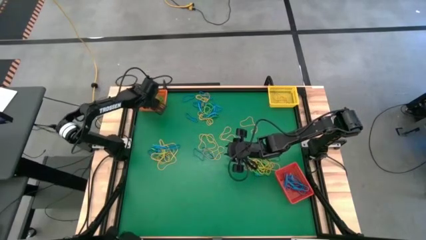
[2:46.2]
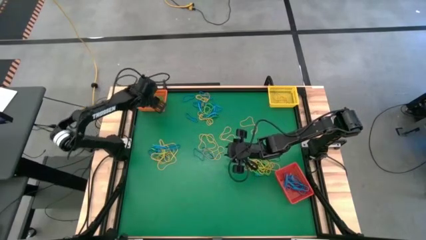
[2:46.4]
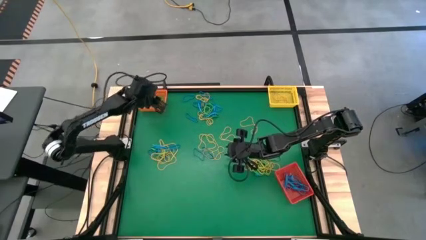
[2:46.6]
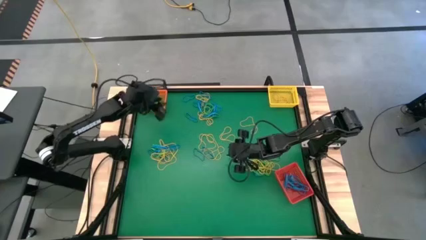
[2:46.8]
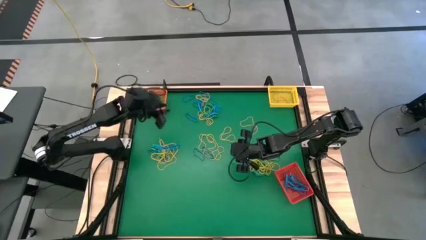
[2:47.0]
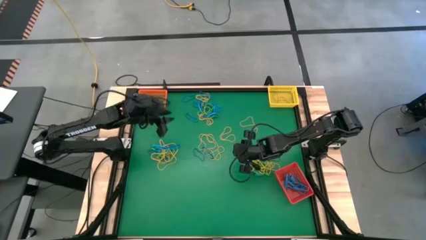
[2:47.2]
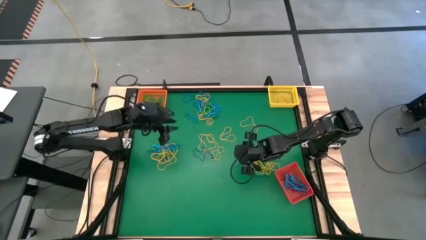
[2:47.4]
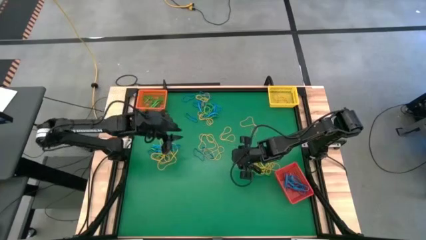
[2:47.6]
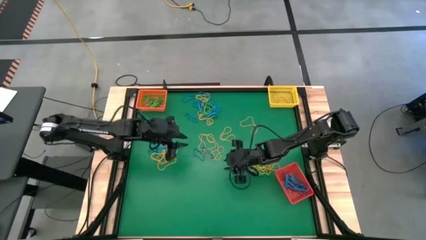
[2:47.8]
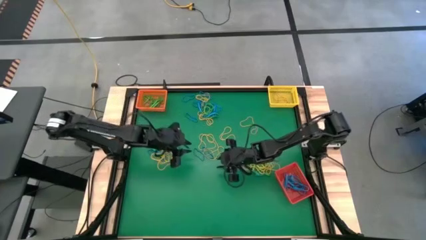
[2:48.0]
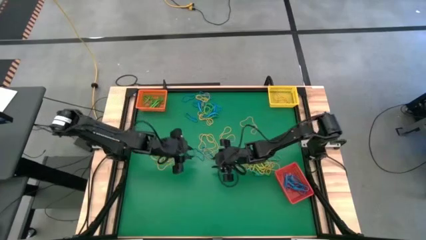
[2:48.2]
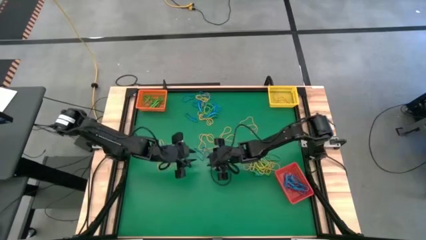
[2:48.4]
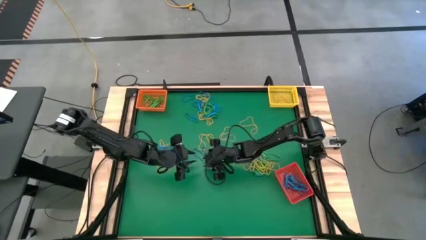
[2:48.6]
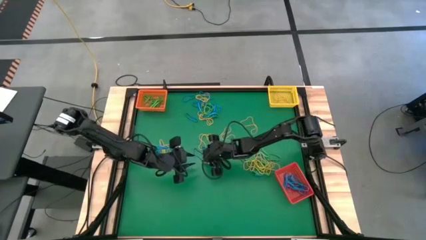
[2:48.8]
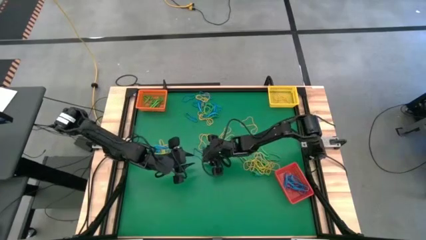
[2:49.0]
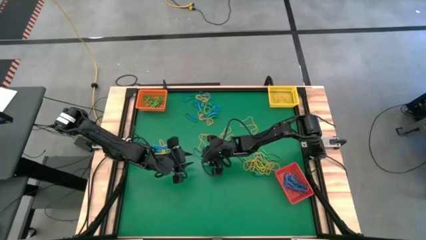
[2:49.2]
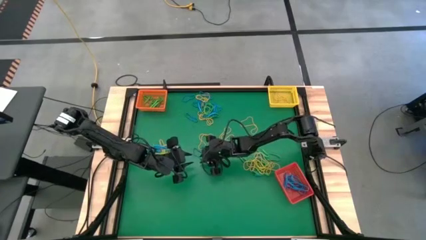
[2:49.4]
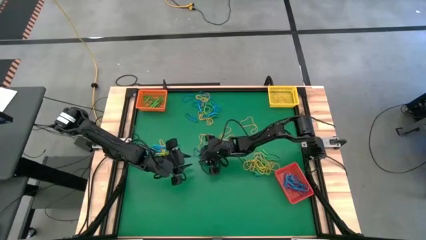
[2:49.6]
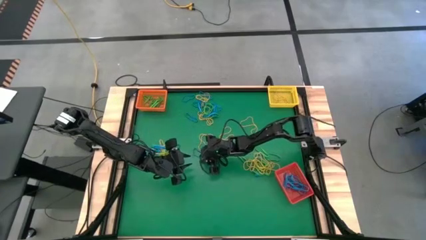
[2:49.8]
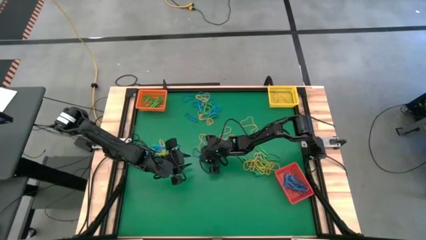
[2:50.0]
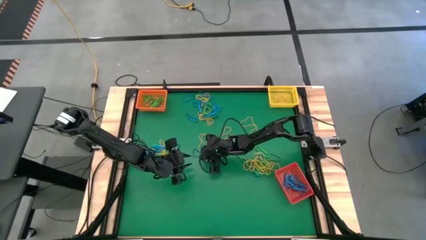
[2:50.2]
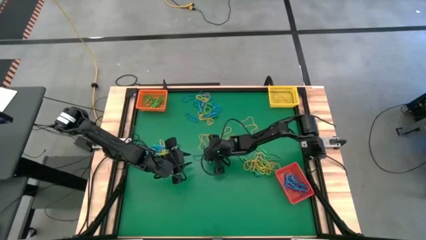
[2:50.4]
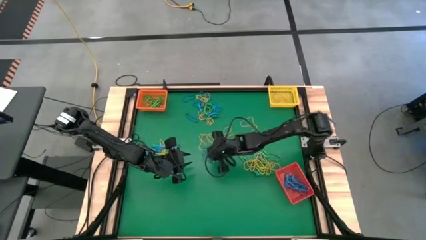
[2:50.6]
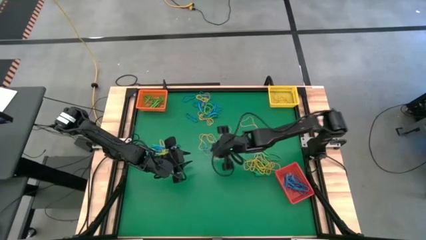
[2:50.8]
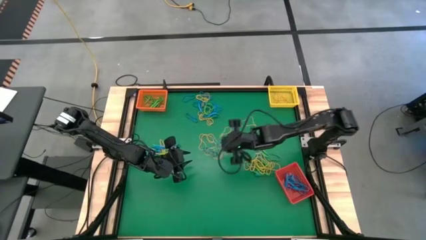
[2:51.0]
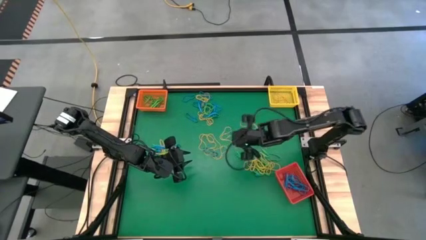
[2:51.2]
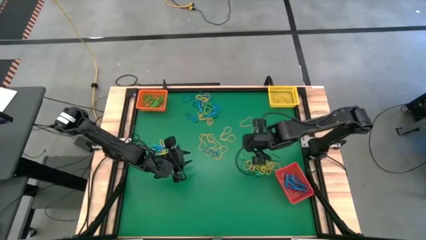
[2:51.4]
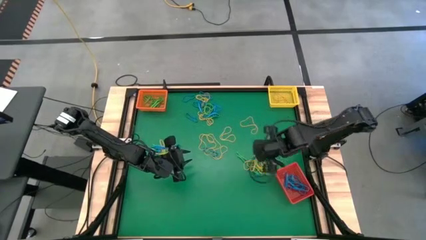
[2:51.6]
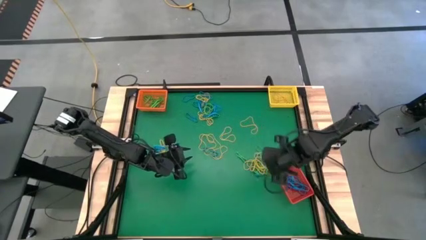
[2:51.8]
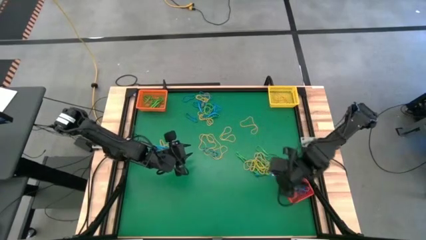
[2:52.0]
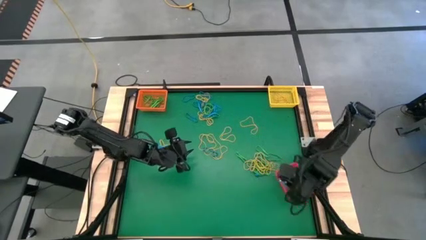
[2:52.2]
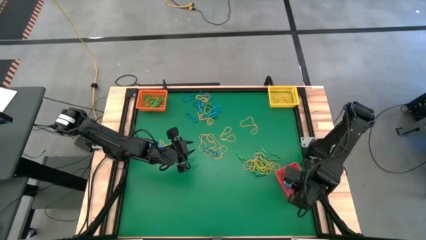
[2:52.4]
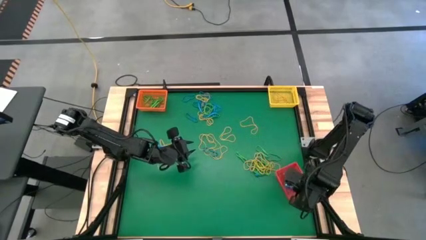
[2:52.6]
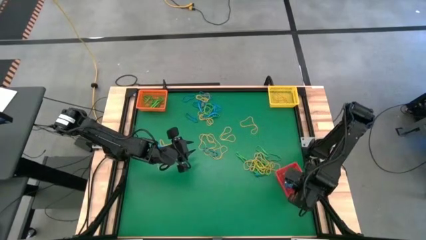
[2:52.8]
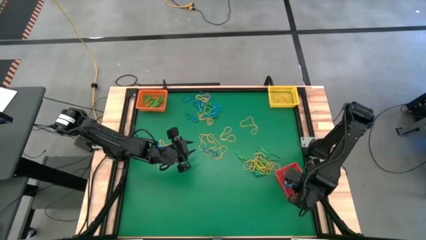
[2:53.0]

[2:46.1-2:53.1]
Task: Sort rubber bands into baskets
Put the blue rubber band into the red bin

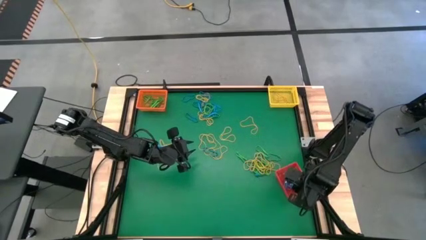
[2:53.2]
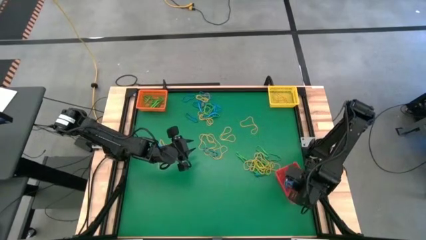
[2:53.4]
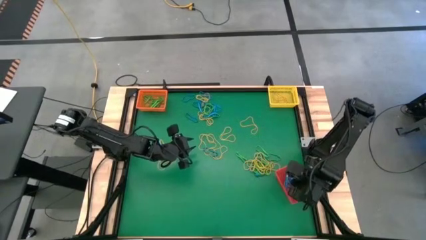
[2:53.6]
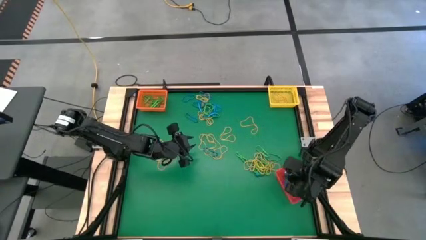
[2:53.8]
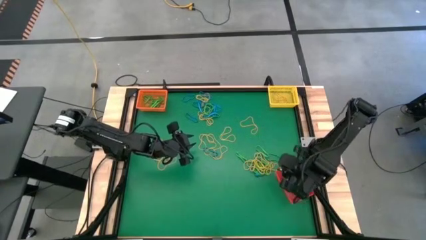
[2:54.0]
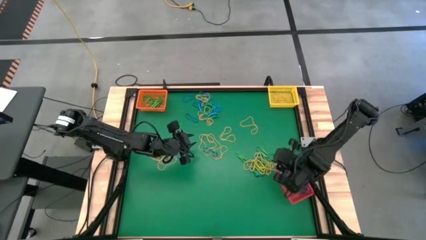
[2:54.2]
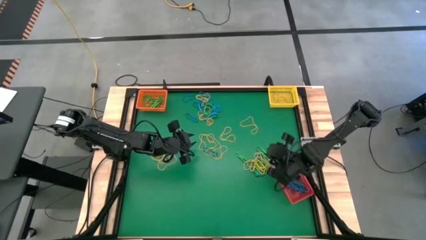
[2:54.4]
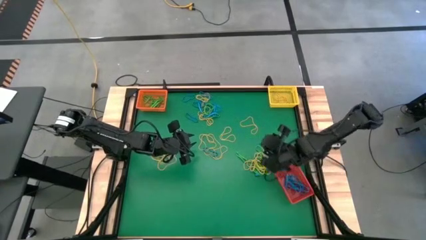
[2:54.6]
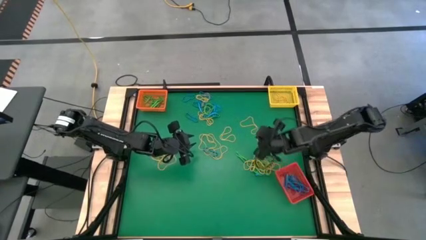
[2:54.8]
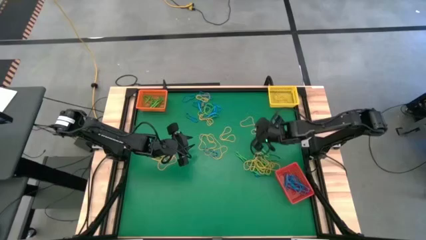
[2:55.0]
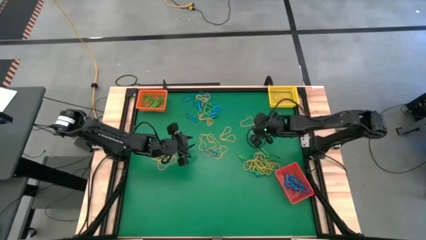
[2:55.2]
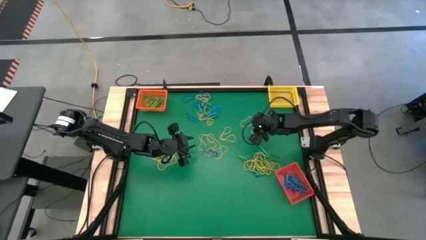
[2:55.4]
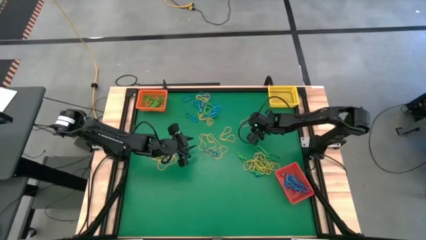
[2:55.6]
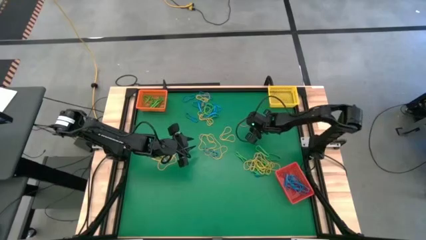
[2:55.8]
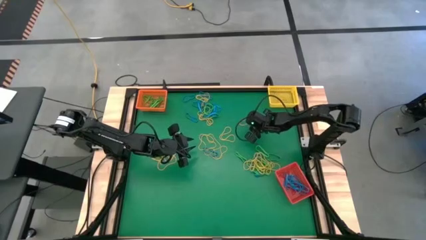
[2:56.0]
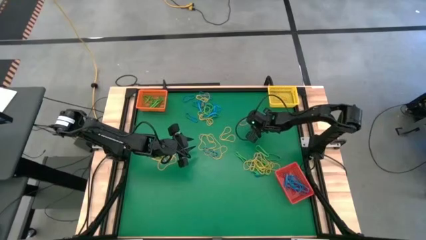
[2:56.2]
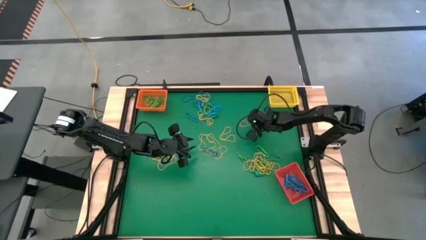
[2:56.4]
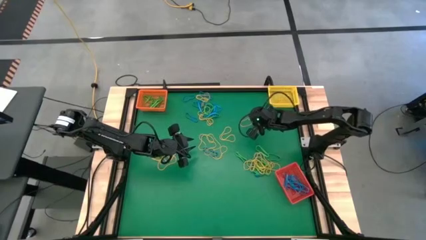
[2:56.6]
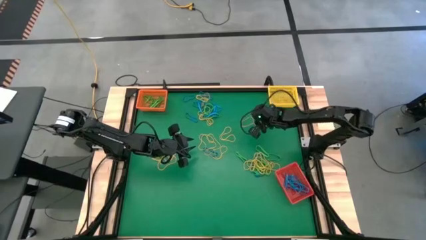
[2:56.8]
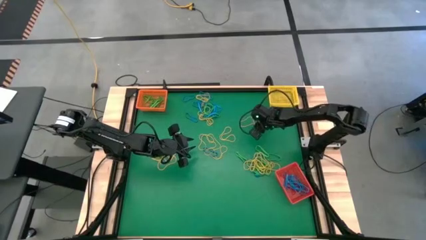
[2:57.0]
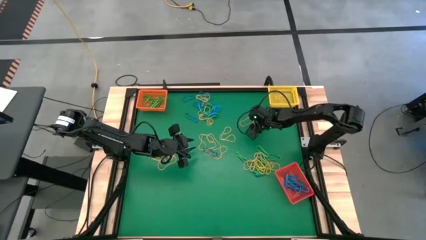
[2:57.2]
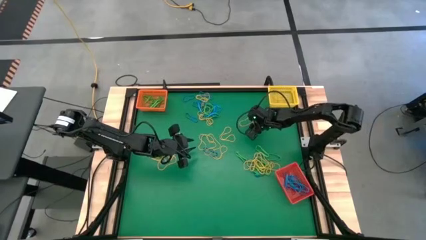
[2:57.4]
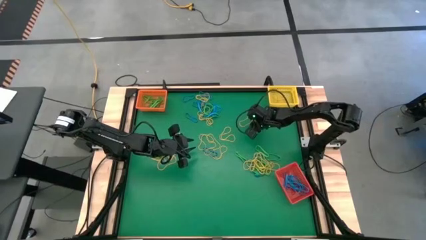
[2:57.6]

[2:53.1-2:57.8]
Put the yellow rubber band into the yellow bin

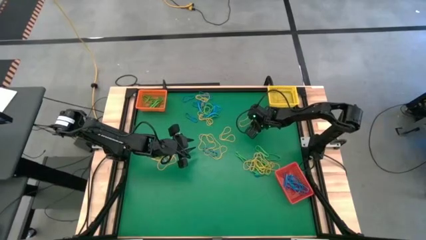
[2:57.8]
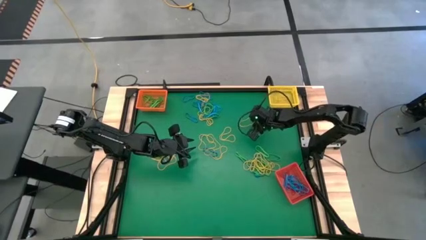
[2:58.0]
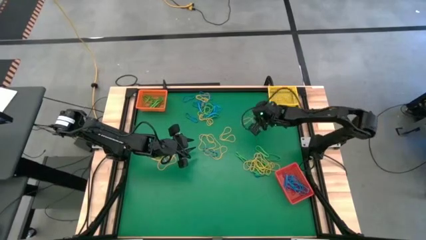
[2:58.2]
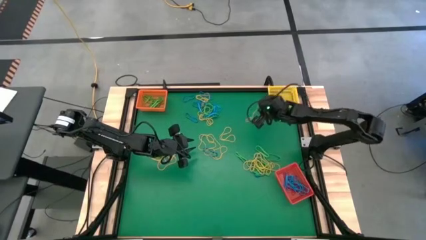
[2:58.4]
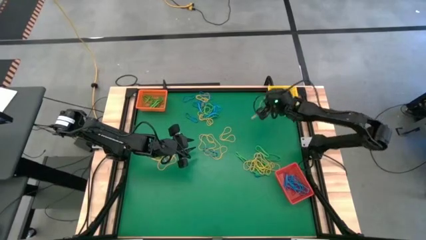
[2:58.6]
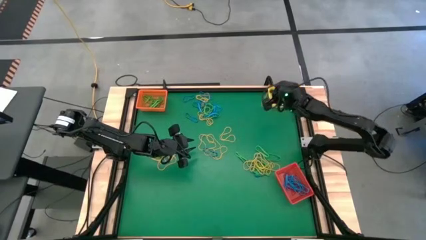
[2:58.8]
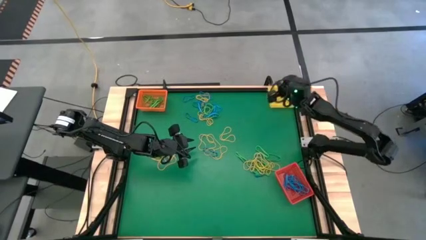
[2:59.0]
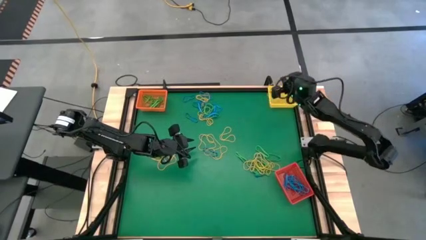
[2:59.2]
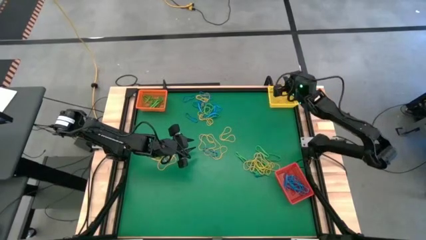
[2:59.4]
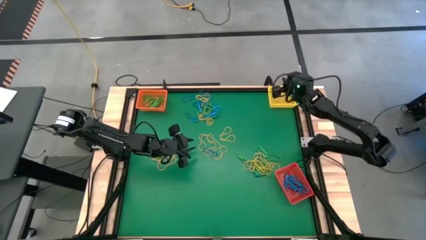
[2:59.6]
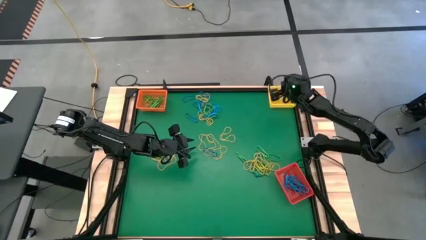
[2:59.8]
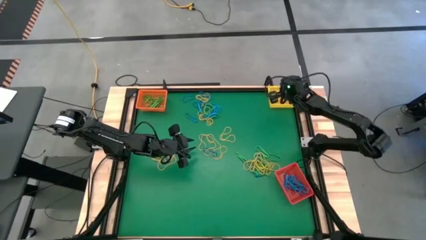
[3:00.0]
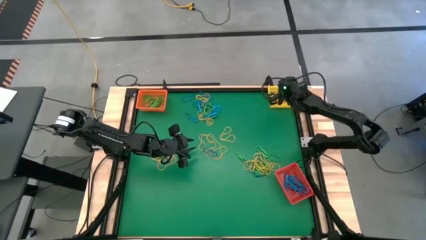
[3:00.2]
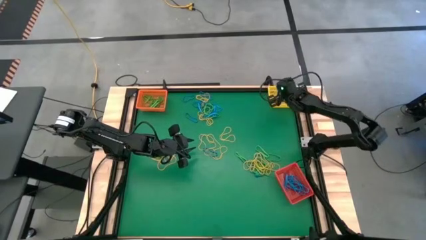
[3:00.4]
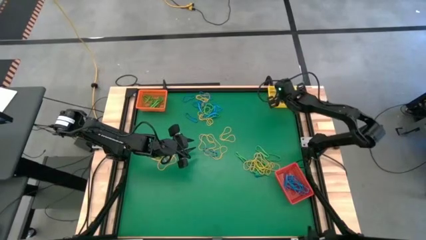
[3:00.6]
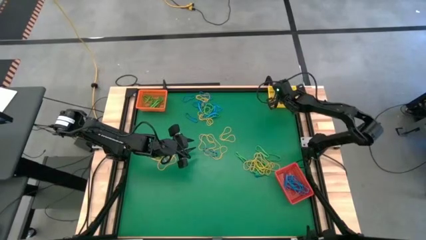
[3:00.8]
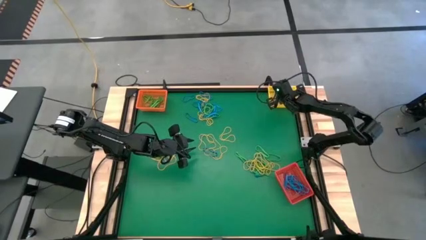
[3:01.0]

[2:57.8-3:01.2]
Put the yellow rubber band into the yellow bin
